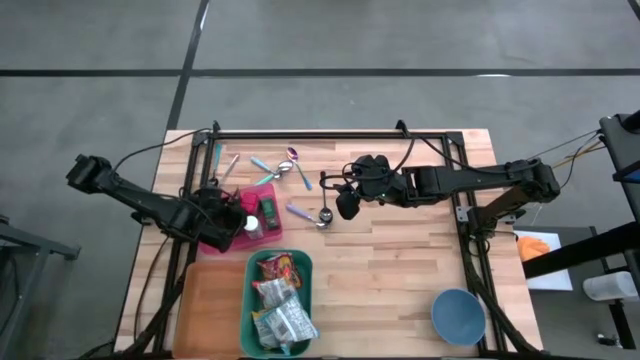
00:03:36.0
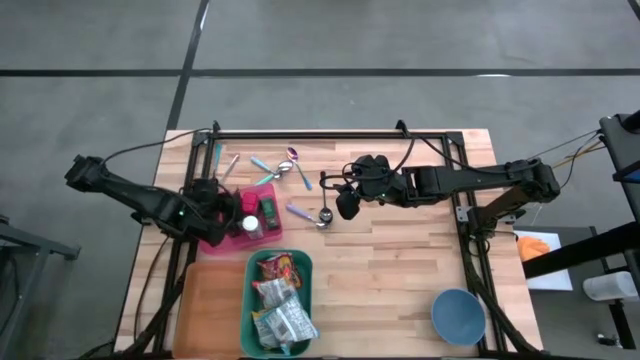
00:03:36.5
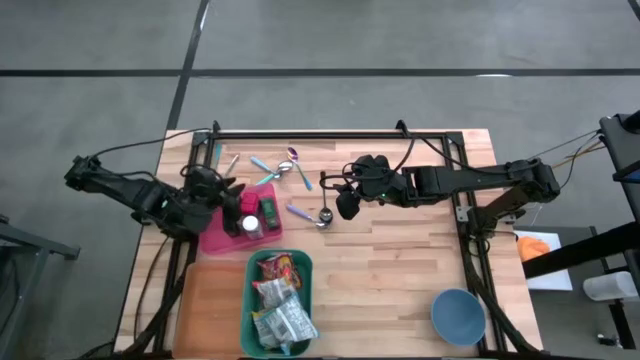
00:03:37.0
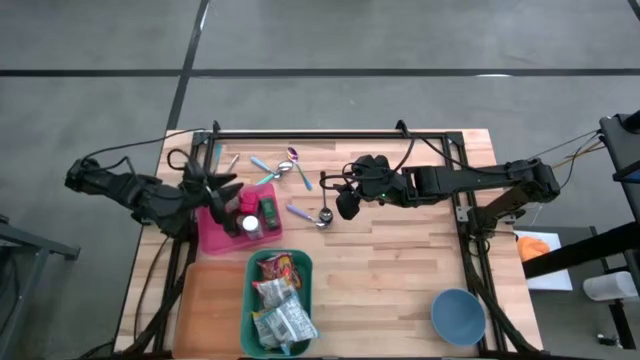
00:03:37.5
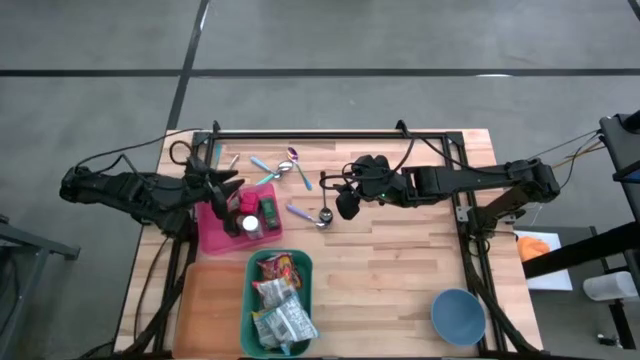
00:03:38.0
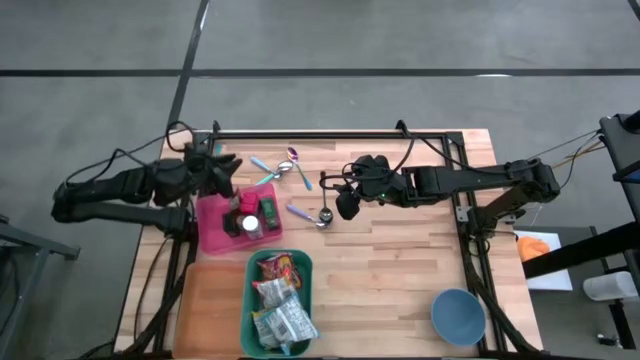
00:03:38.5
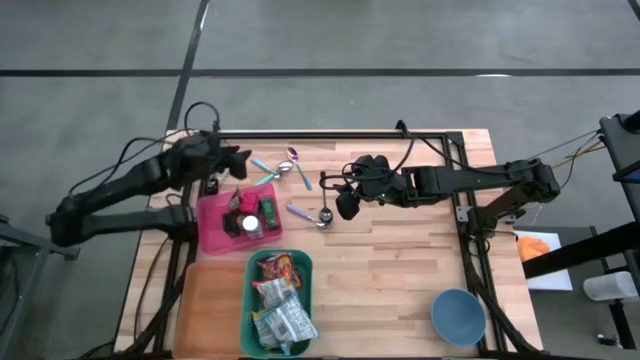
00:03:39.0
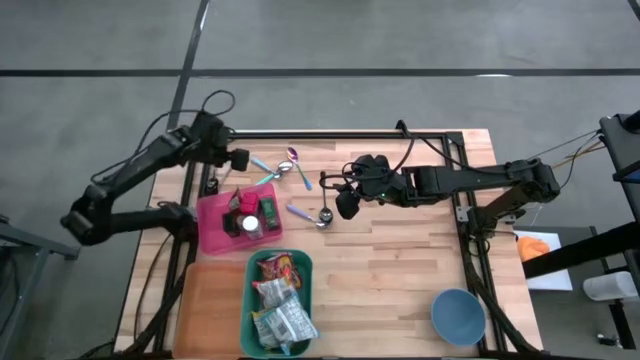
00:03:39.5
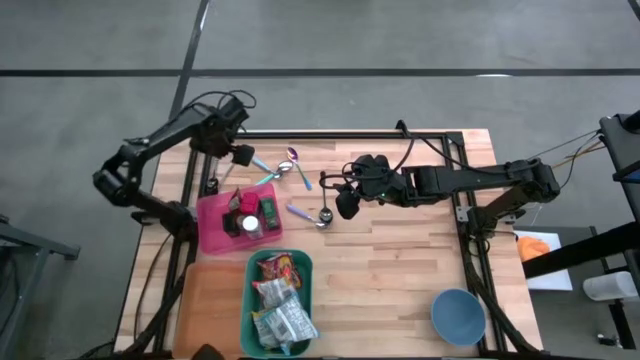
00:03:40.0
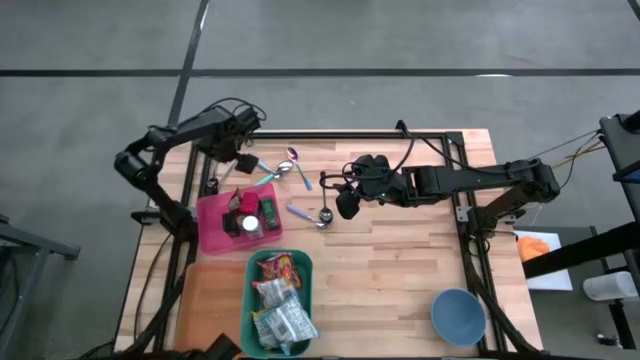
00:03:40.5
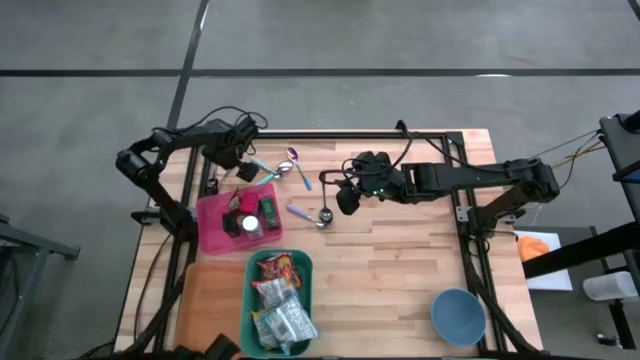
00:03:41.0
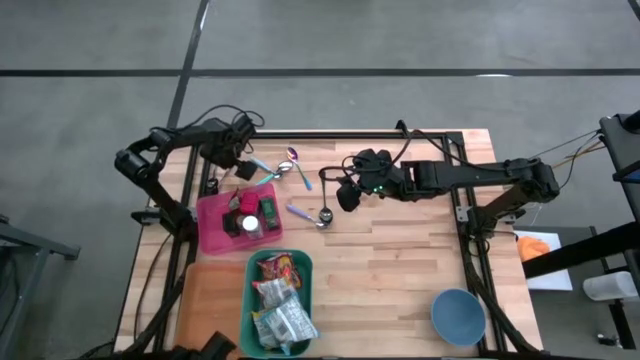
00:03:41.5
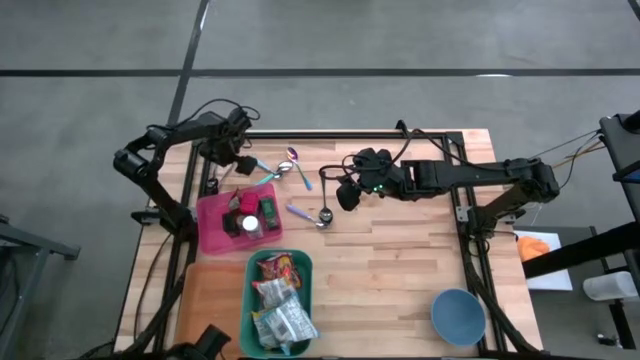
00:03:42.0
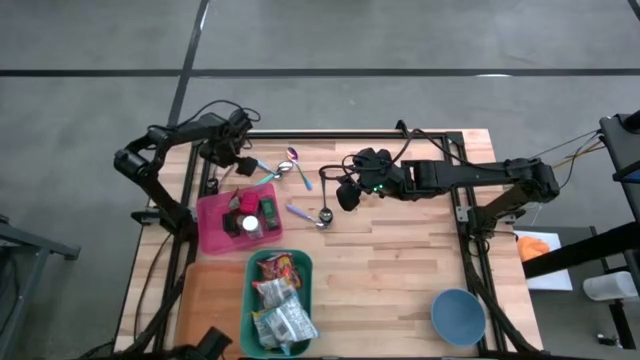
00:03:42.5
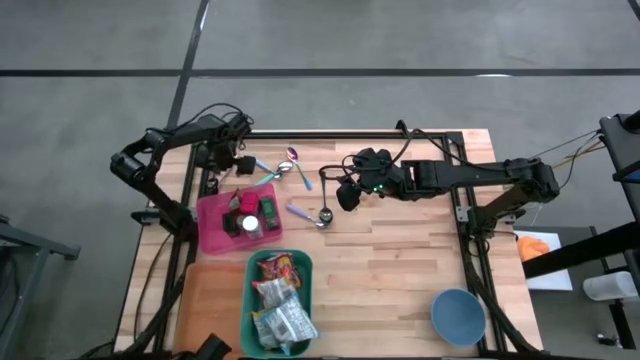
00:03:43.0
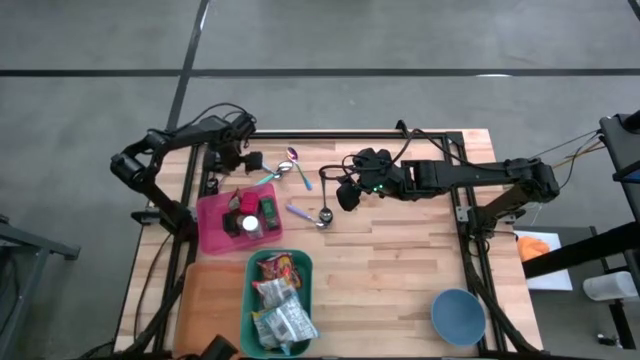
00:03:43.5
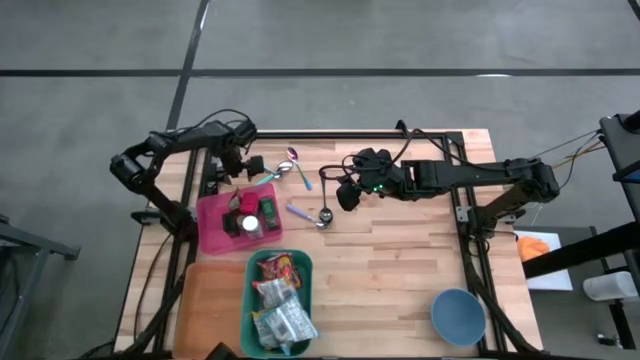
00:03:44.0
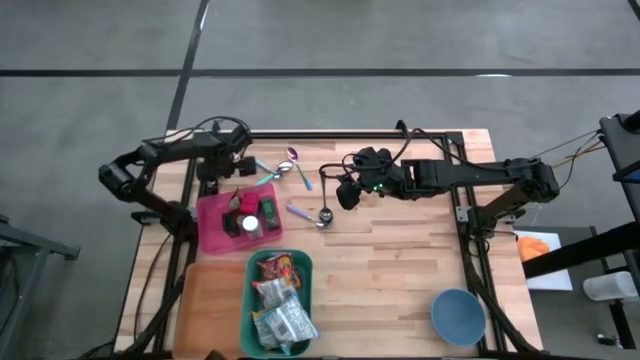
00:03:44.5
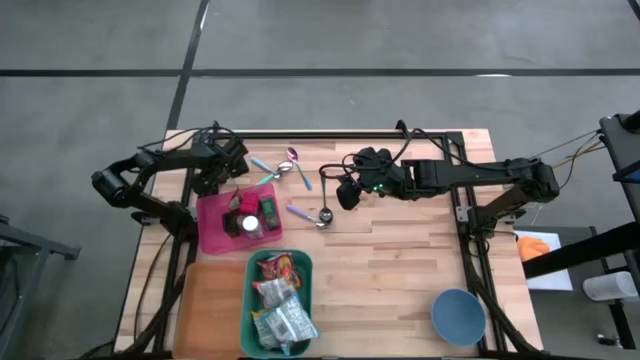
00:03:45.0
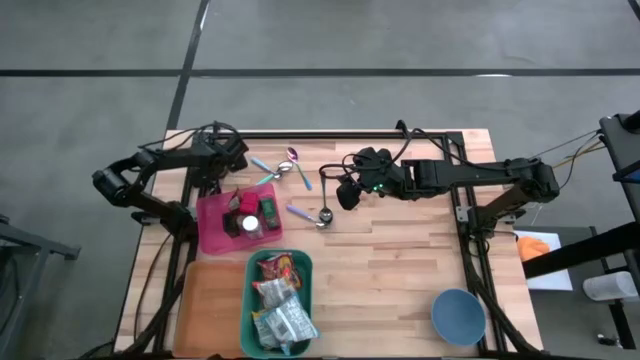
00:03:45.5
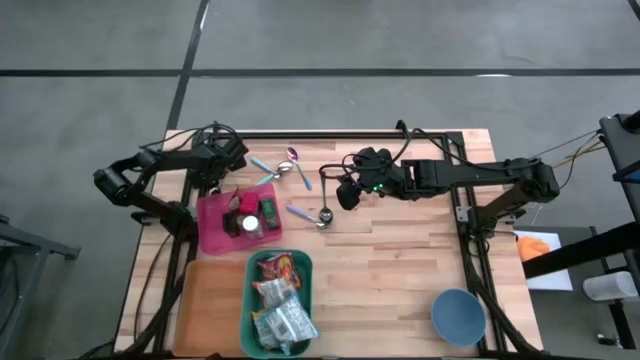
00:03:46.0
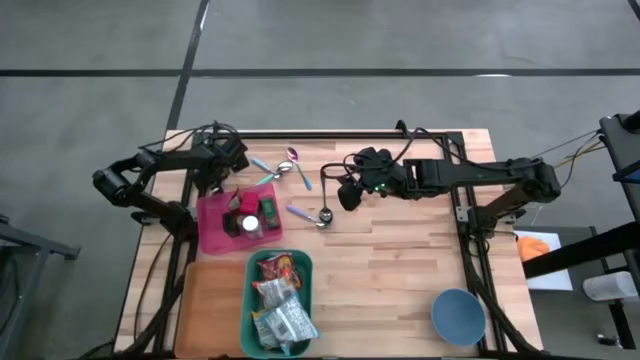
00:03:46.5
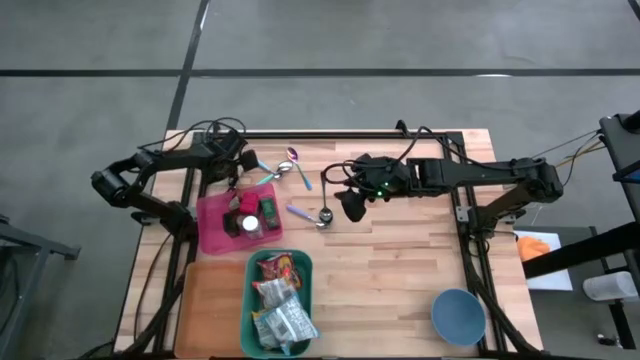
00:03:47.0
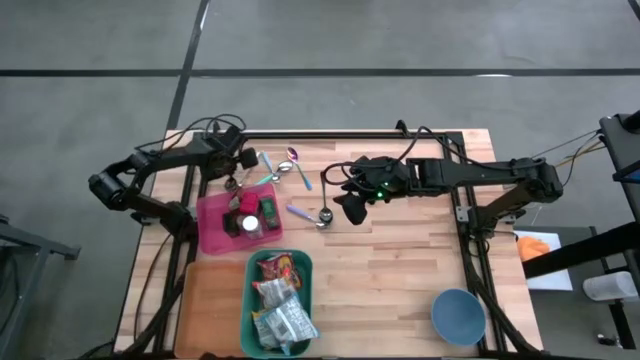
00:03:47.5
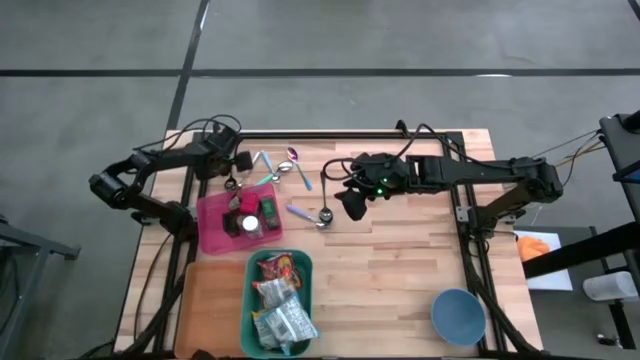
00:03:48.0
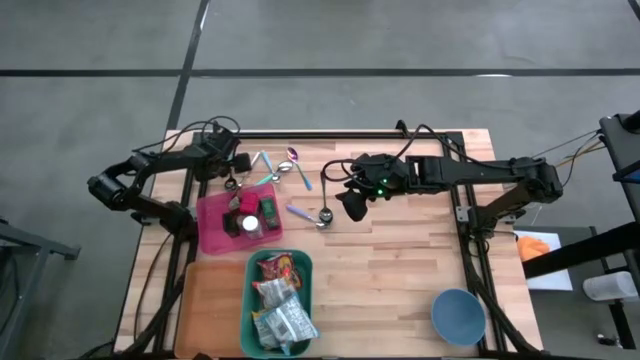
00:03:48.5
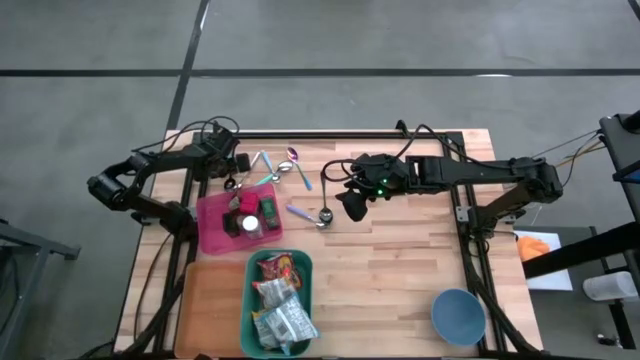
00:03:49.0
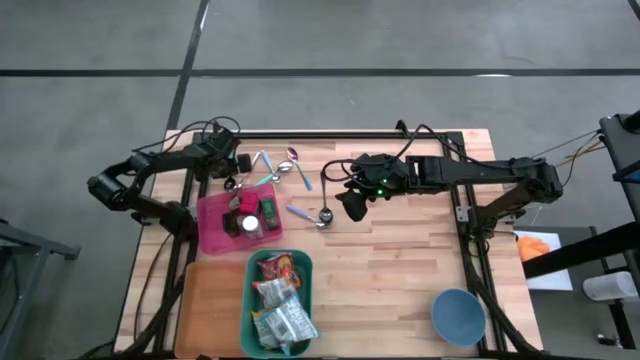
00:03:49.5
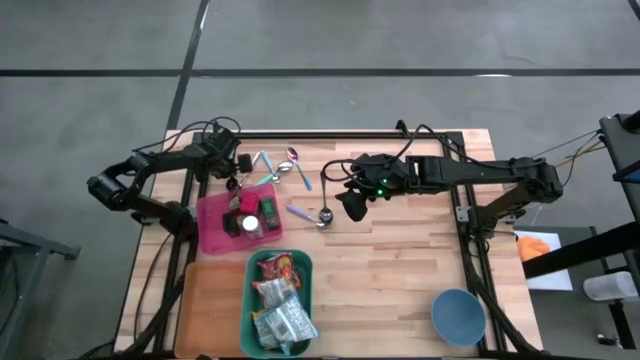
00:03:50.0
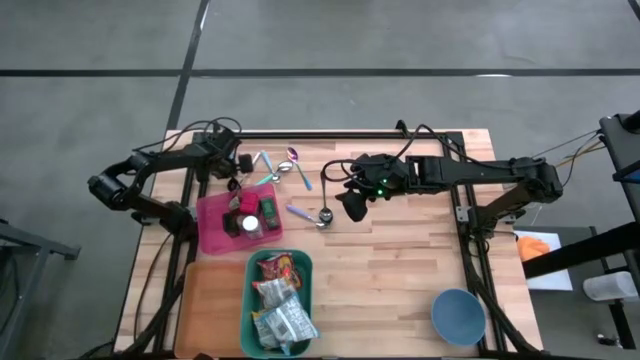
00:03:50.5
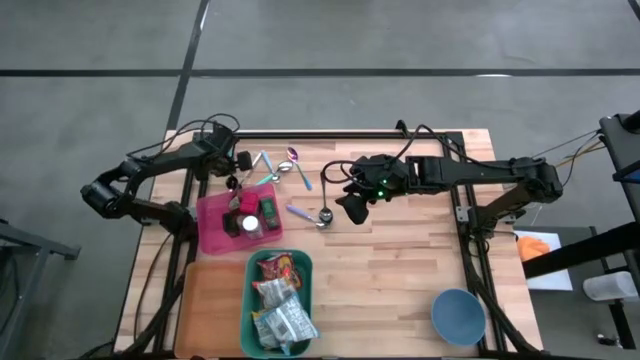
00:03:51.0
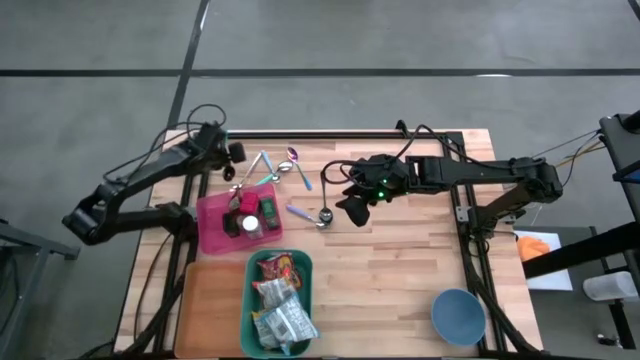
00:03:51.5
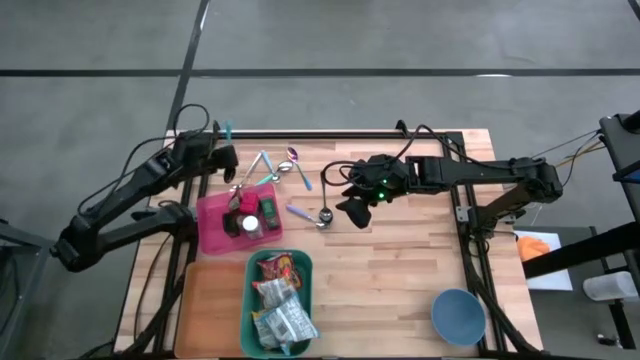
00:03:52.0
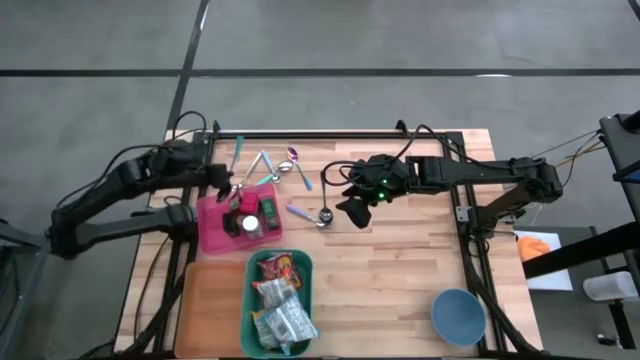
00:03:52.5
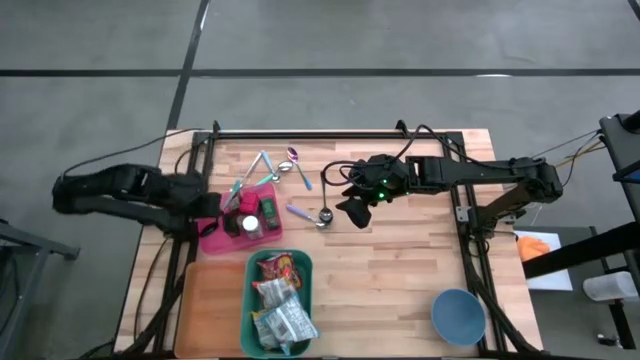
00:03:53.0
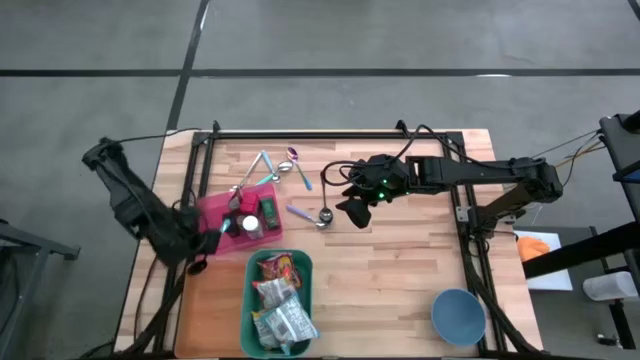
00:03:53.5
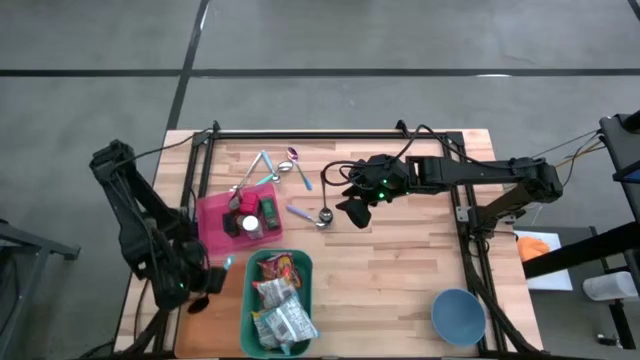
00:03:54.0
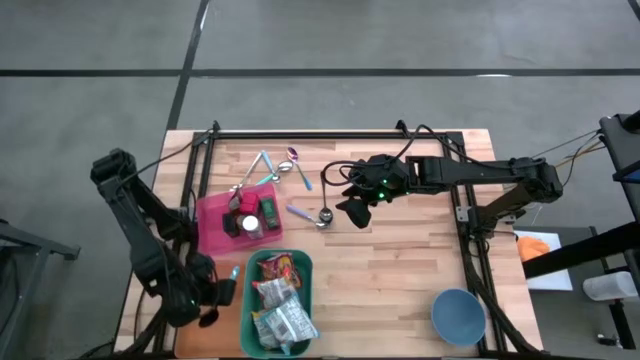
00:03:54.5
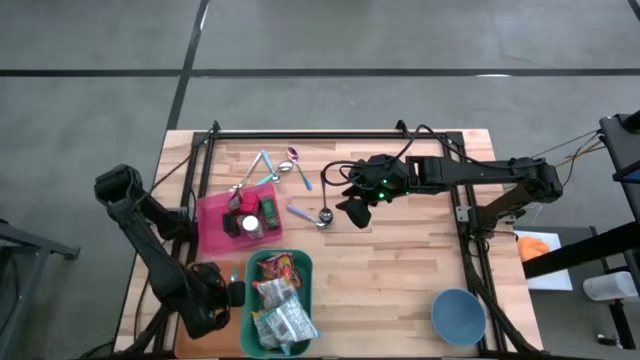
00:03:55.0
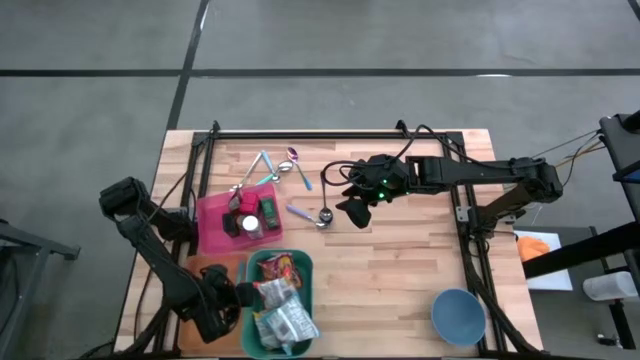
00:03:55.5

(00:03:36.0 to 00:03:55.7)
Put the blue and black spoon into the orange bin
